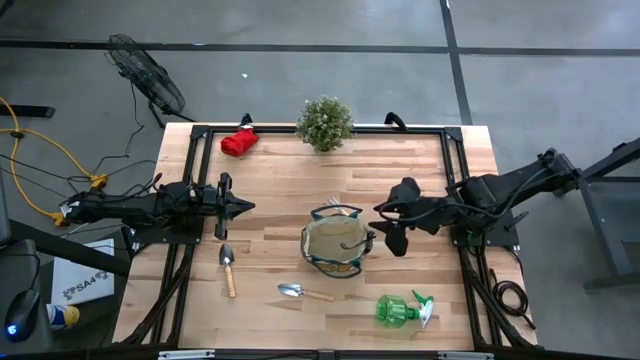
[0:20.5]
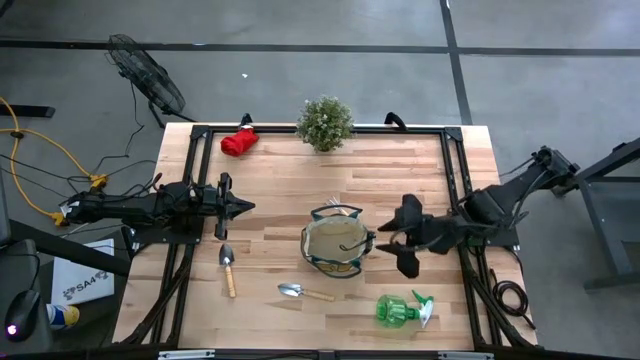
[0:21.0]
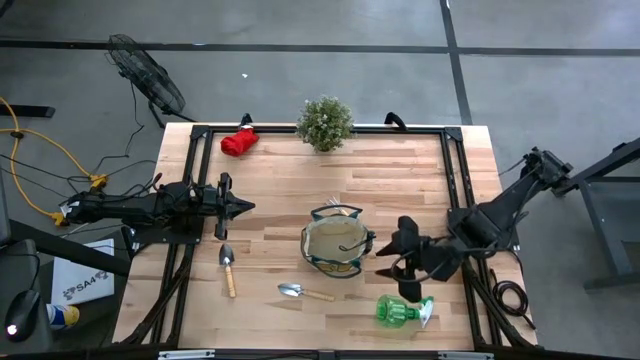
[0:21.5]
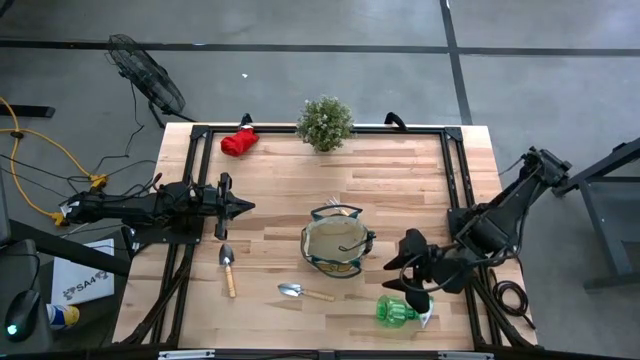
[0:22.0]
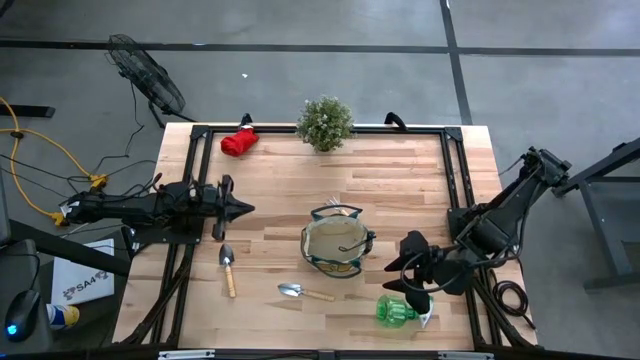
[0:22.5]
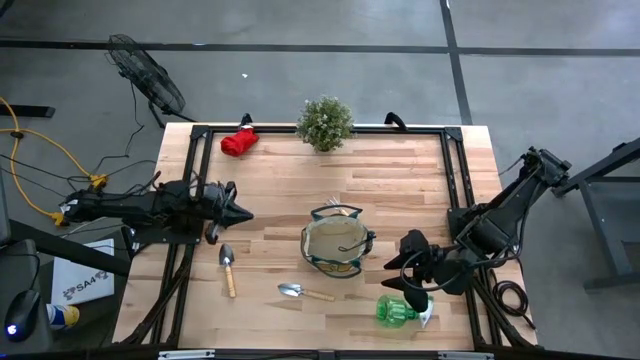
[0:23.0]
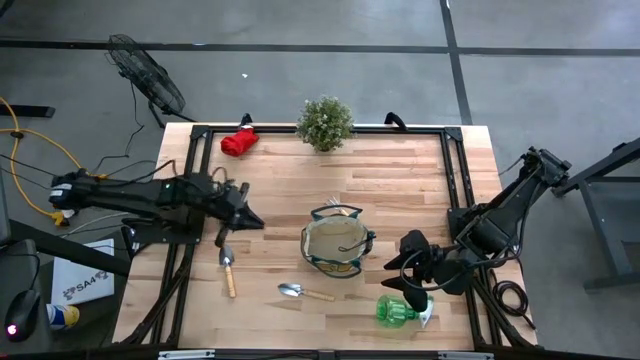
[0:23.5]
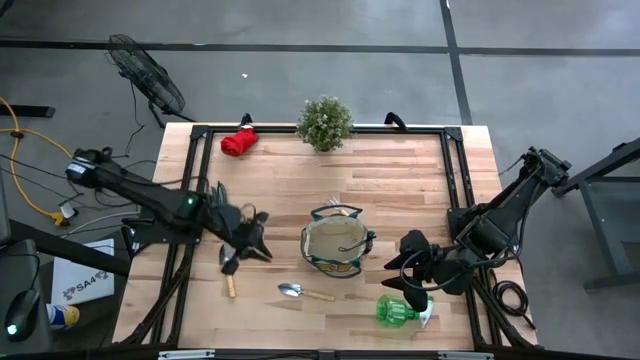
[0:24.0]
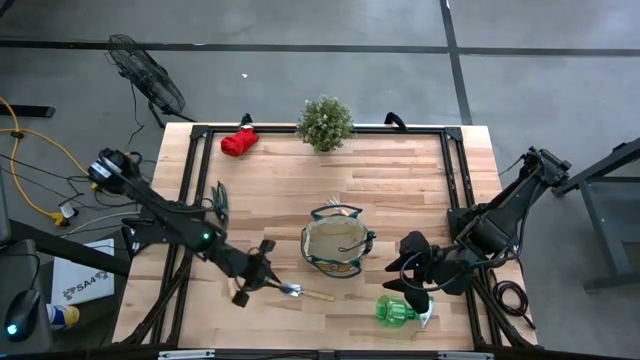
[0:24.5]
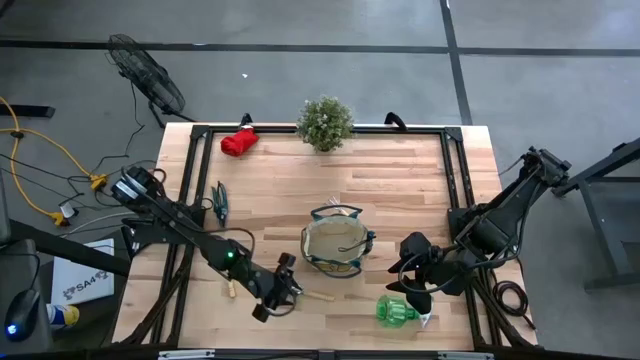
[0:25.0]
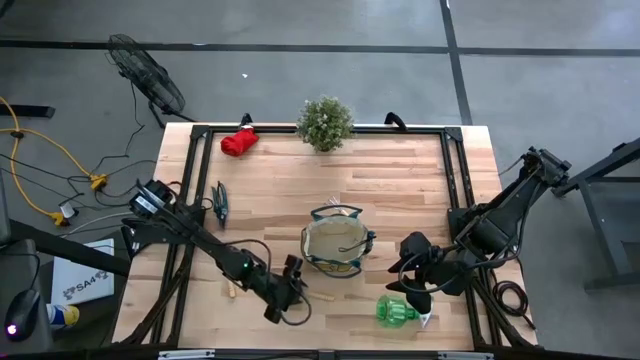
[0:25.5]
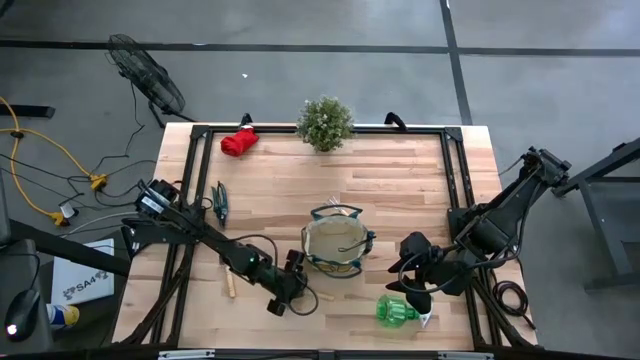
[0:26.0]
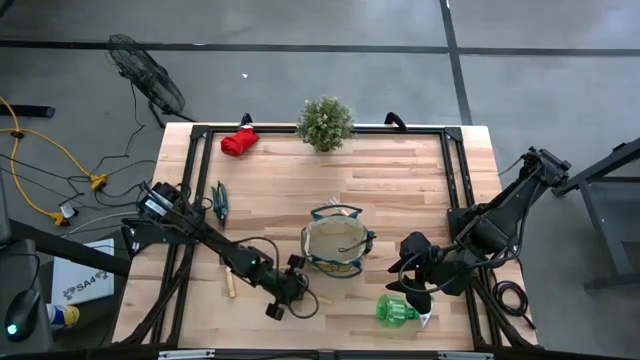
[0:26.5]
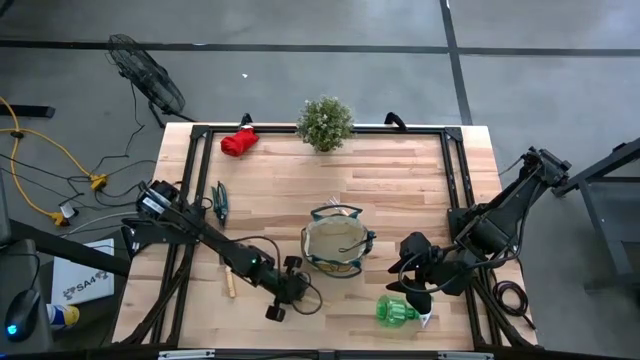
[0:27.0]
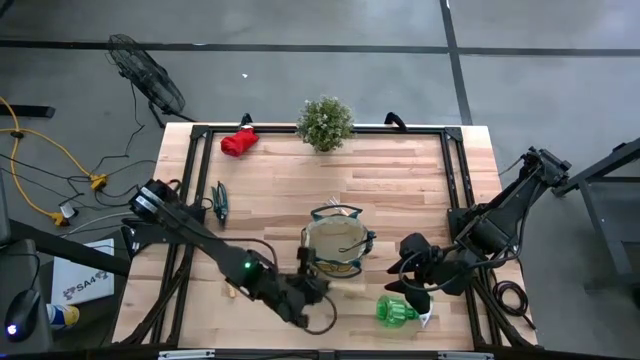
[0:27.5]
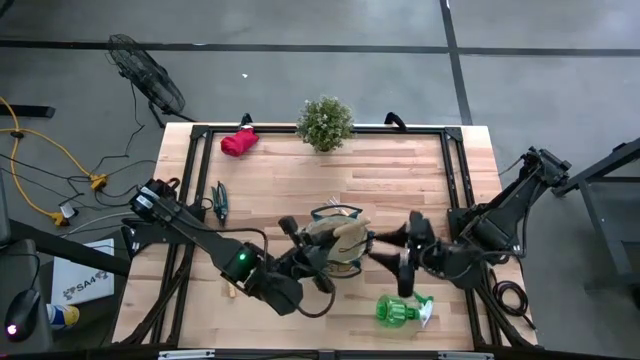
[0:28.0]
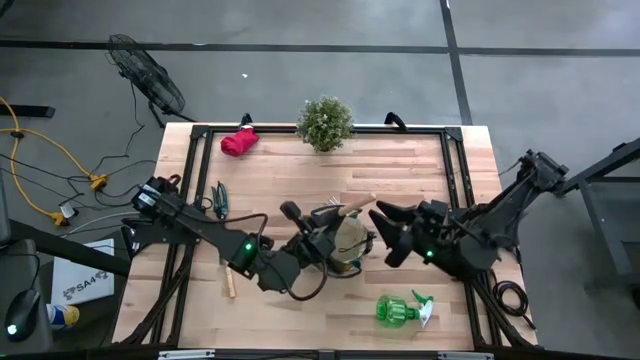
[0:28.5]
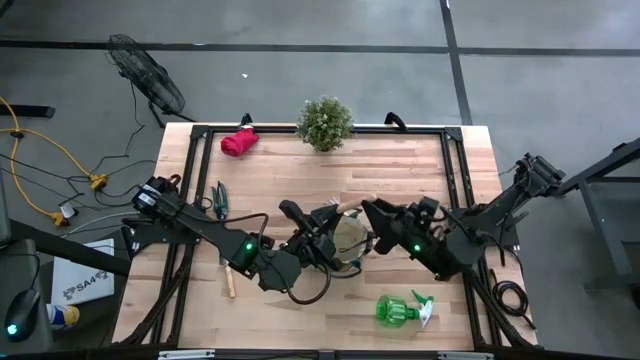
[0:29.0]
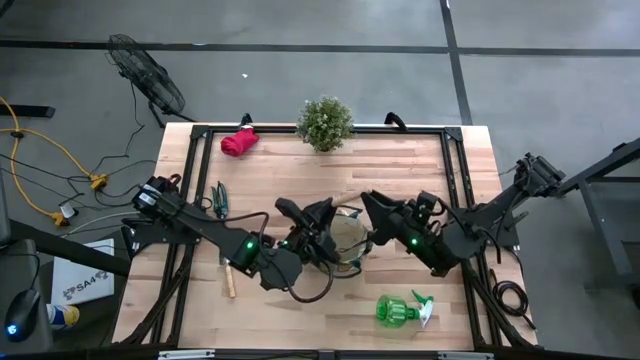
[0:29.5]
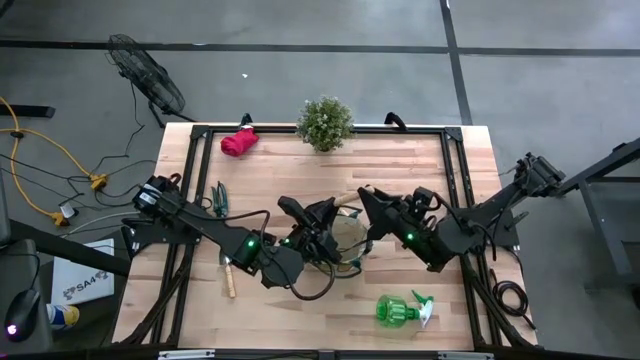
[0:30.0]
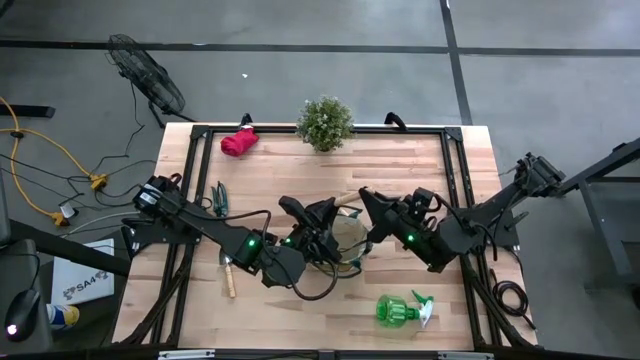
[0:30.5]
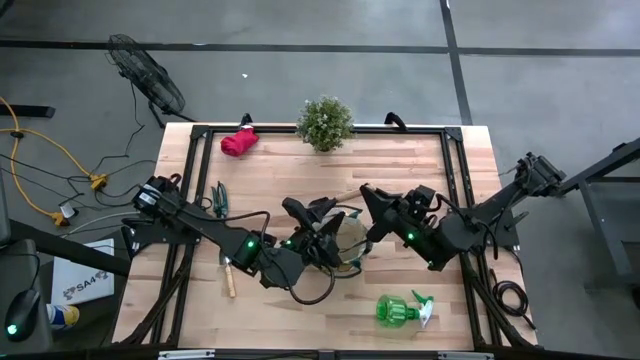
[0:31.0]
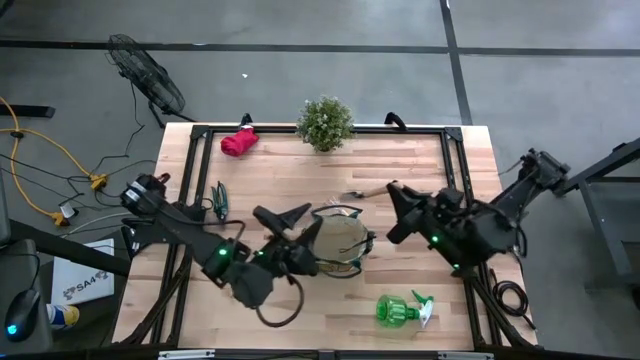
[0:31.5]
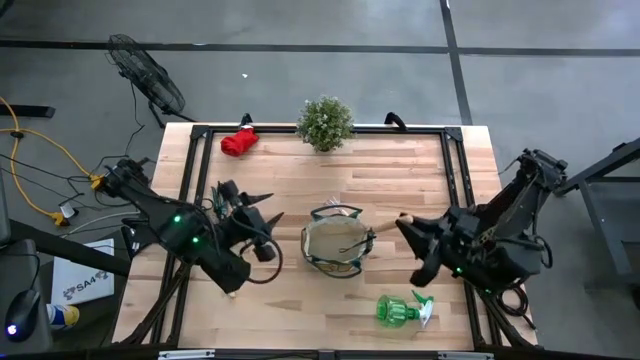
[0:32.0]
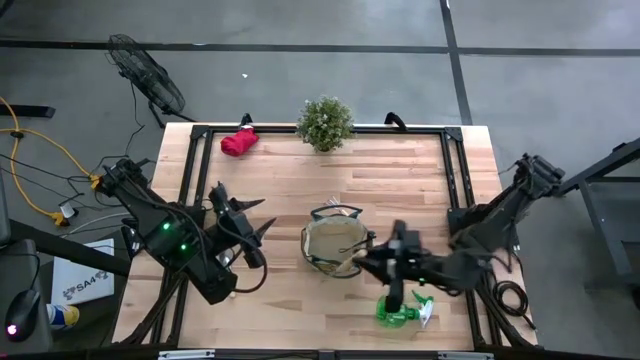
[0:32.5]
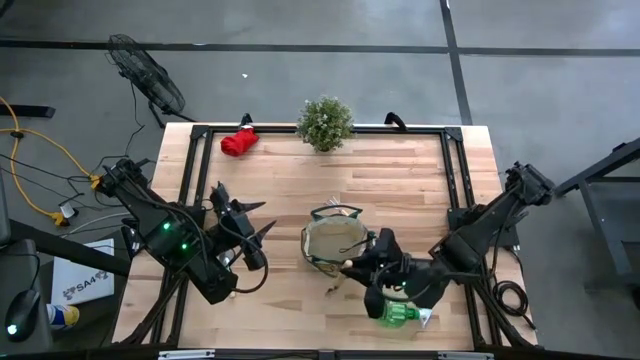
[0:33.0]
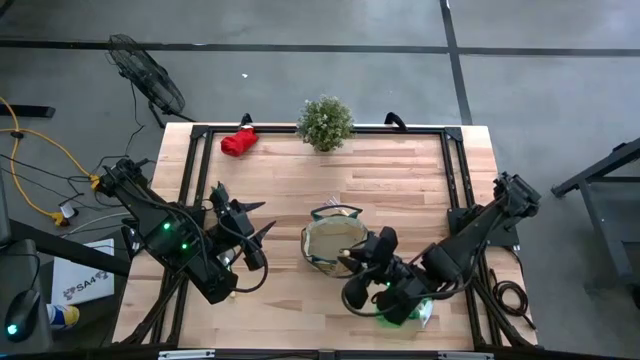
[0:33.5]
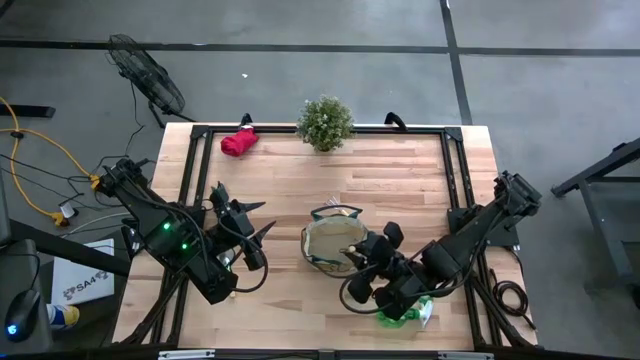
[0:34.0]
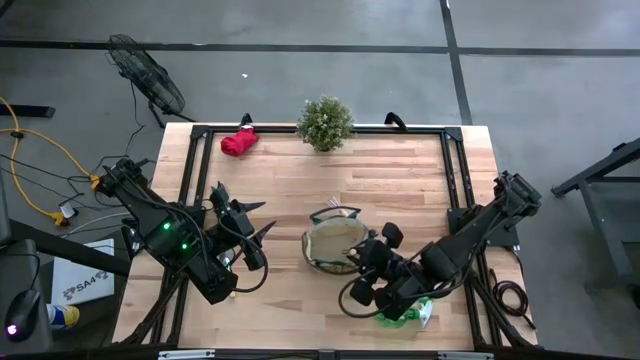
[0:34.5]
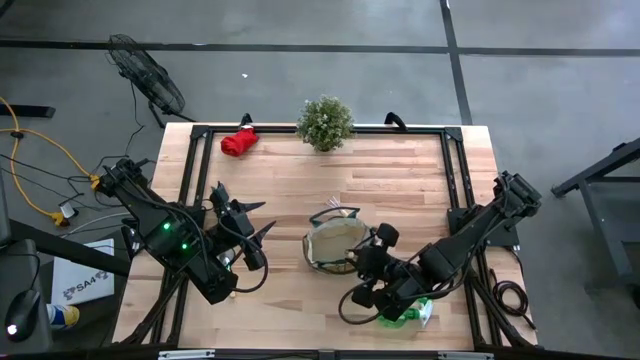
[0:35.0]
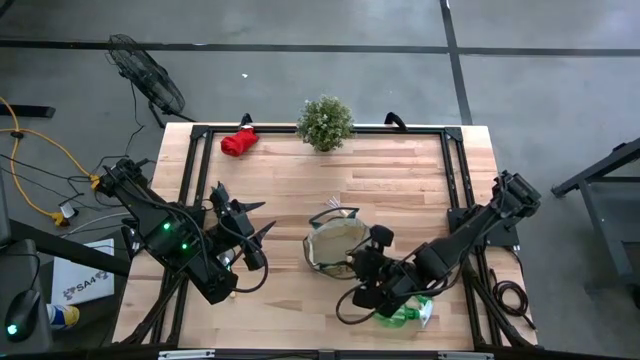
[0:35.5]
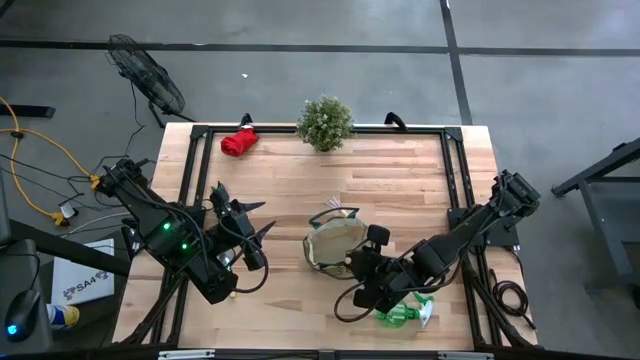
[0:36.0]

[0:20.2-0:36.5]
Task: Pick & Place Garden tools in Gardening bag
Put the right brown trowel into the brown gardening bag
